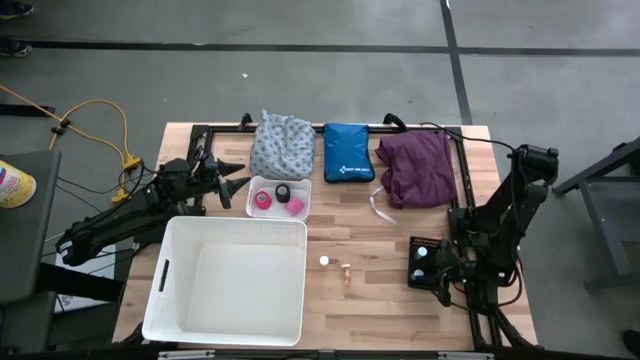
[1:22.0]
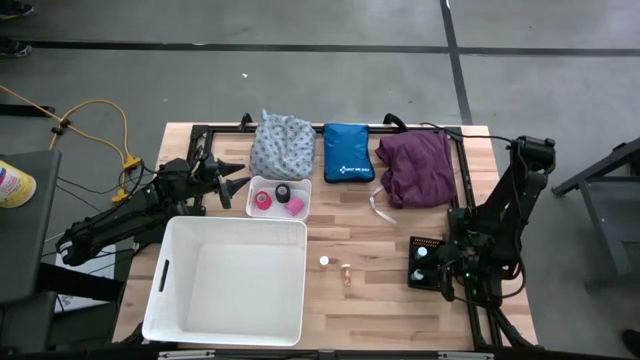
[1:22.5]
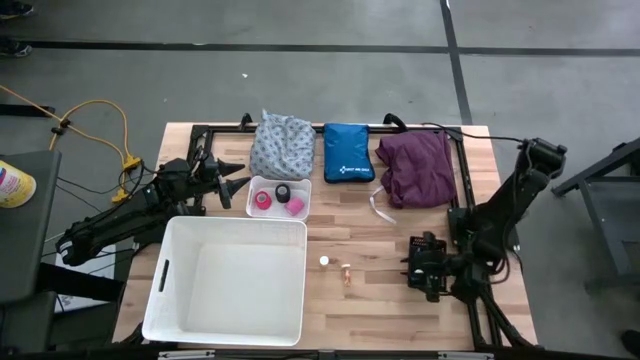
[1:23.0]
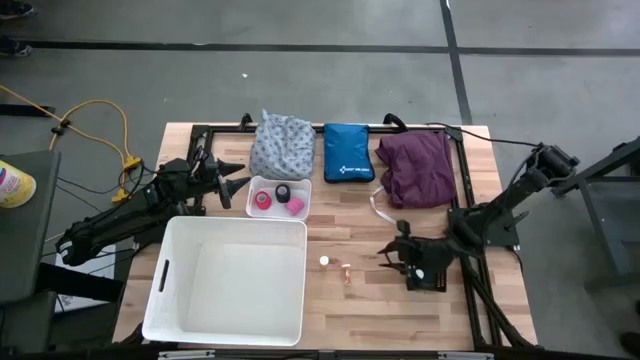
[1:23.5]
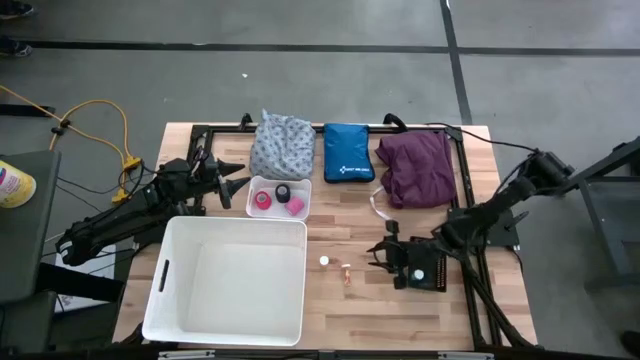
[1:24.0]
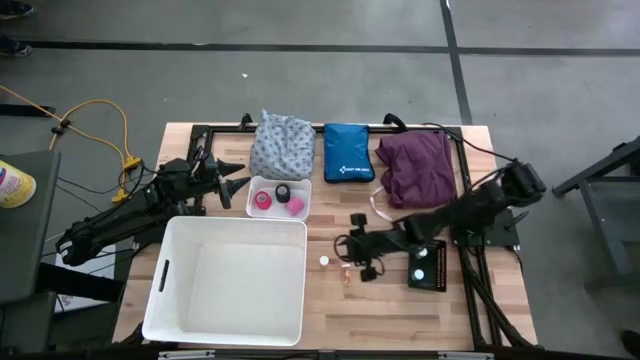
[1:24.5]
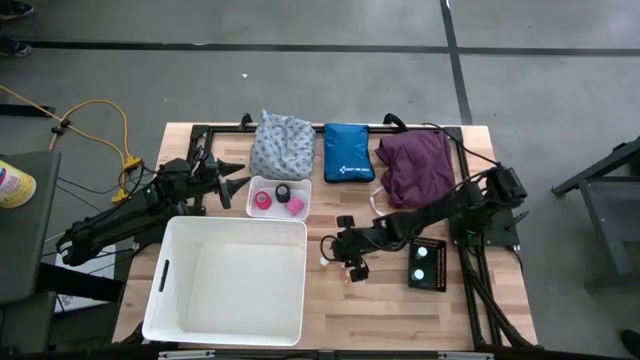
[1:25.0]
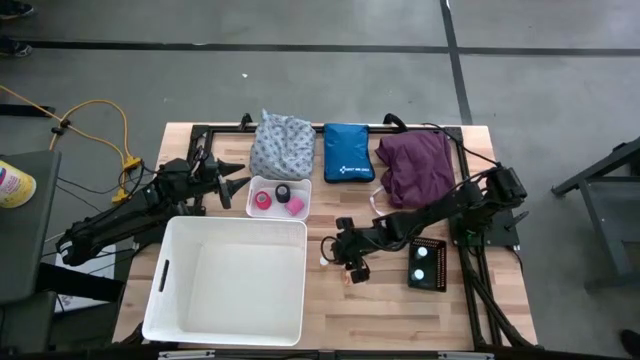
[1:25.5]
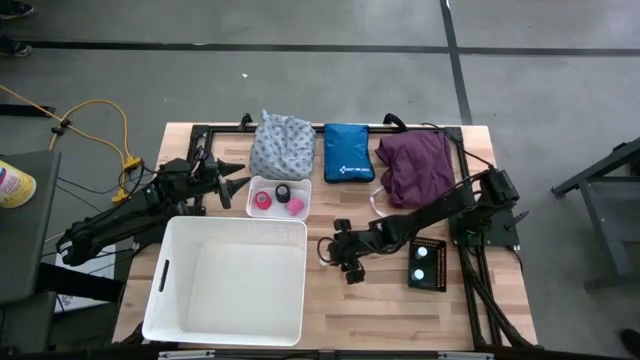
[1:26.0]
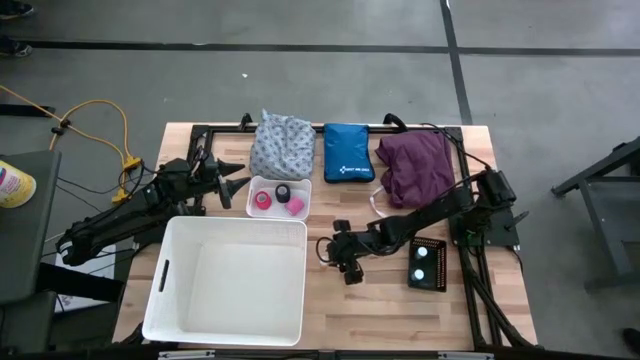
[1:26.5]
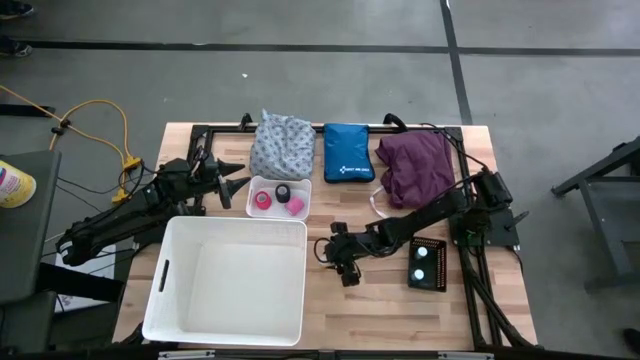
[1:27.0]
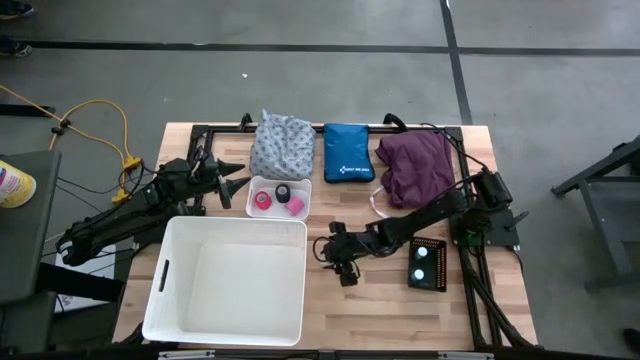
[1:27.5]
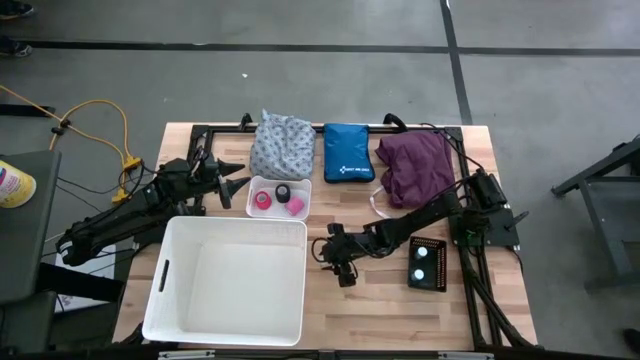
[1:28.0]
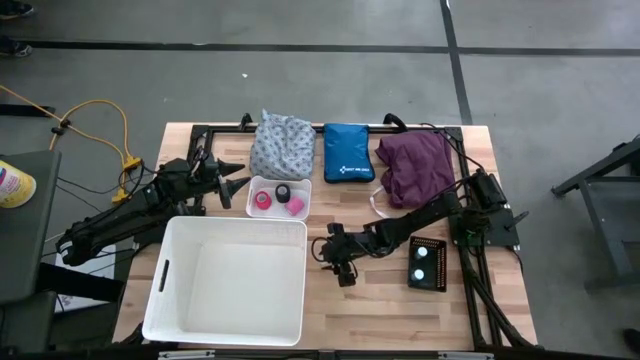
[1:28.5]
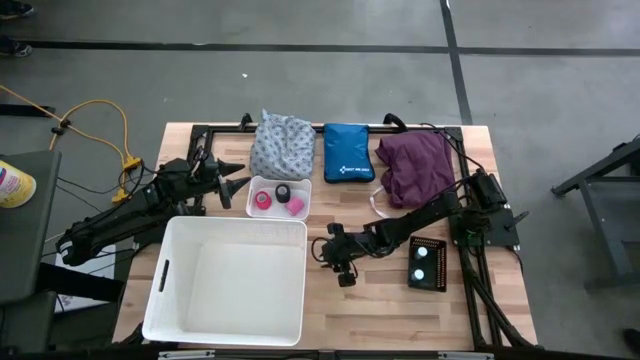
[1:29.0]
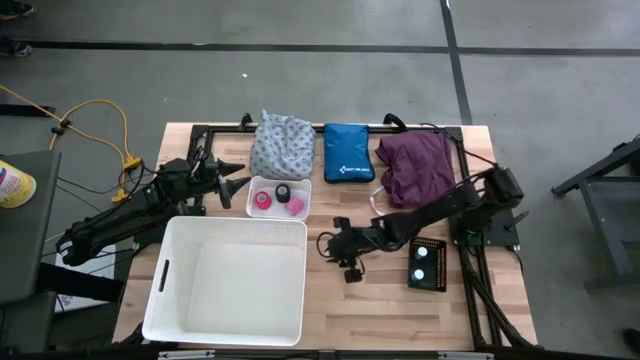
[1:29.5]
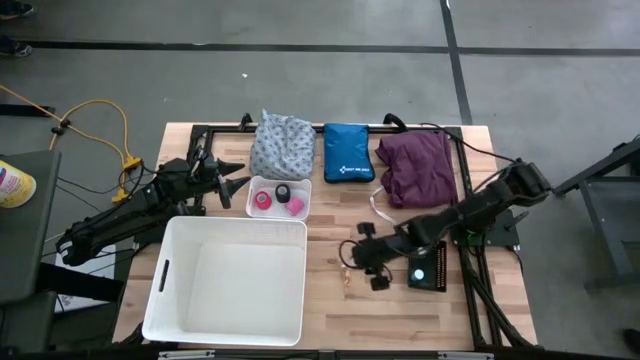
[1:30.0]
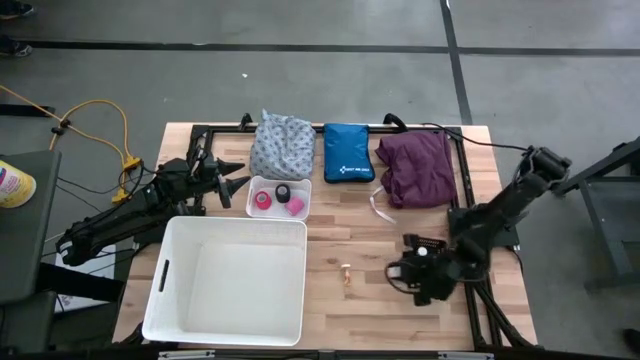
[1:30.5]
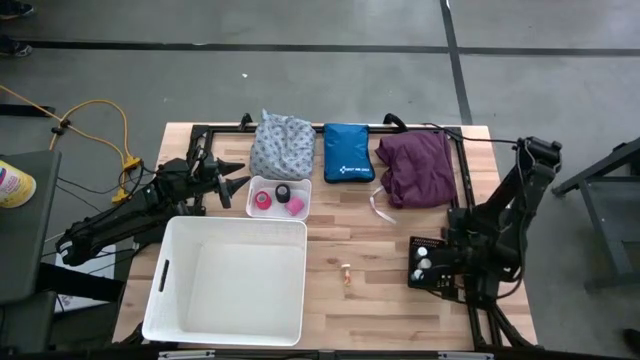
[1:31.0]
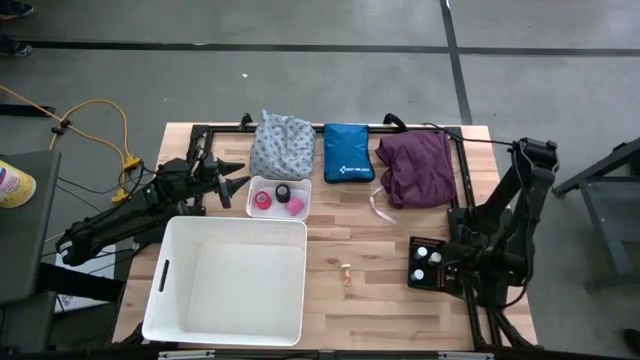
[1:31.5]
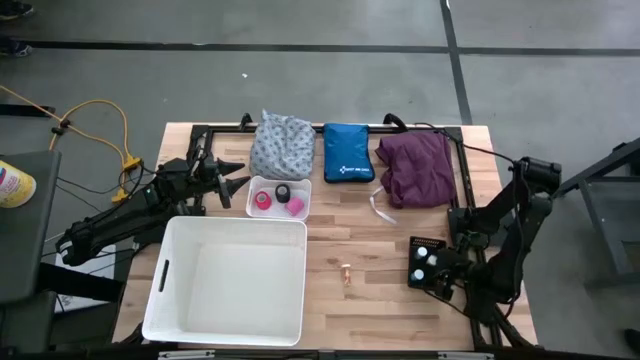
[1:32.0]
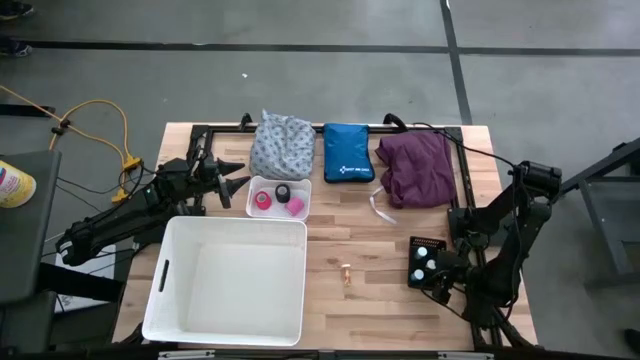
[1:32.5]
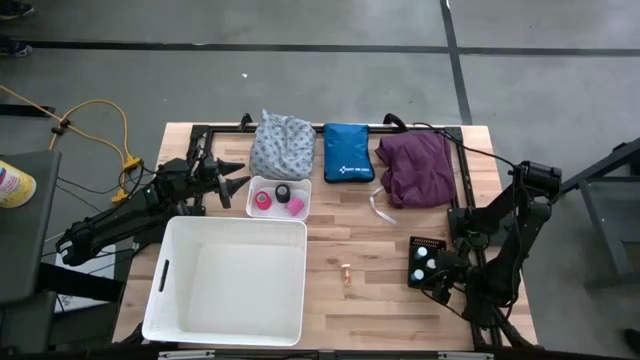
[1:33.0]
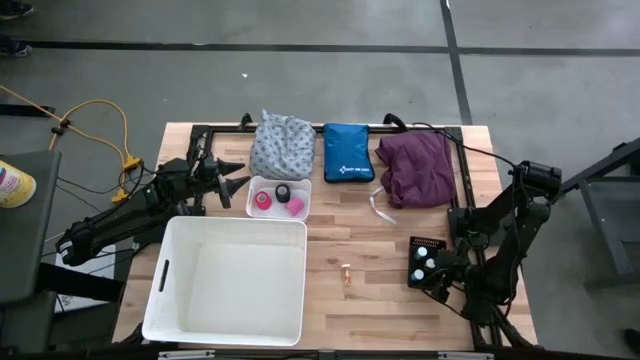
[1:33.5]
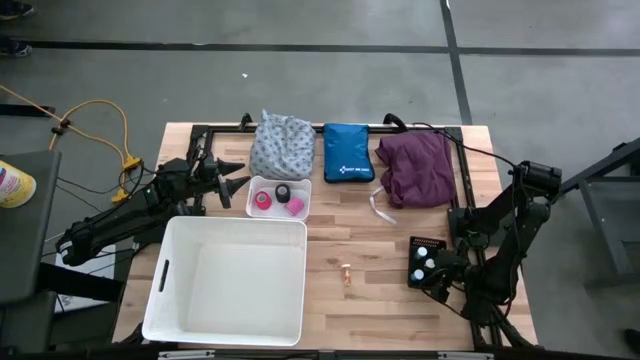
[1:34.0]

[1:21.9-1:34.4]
Task: Pick & place medical supplies in basket/bin
Put the left yellow pill bottle into the black bin

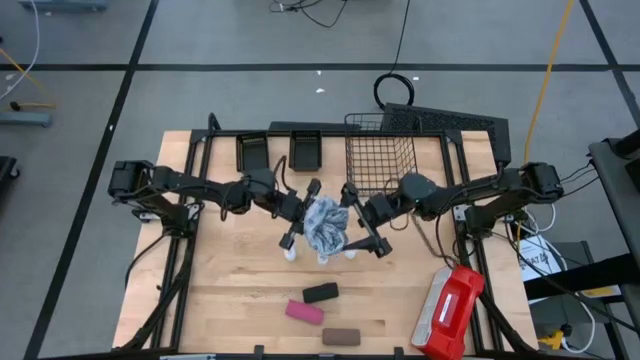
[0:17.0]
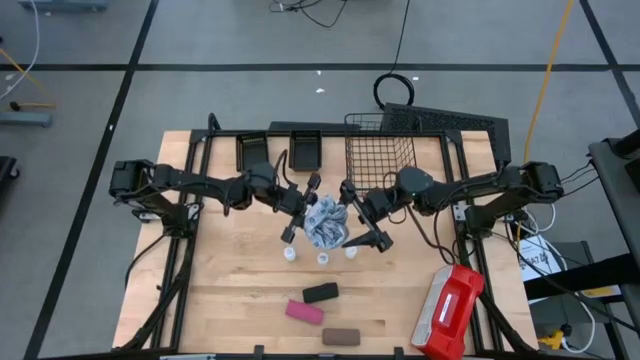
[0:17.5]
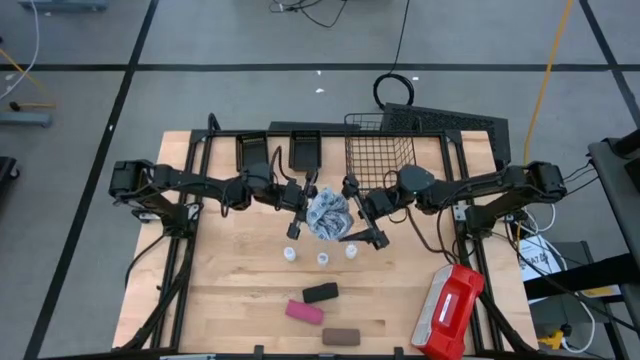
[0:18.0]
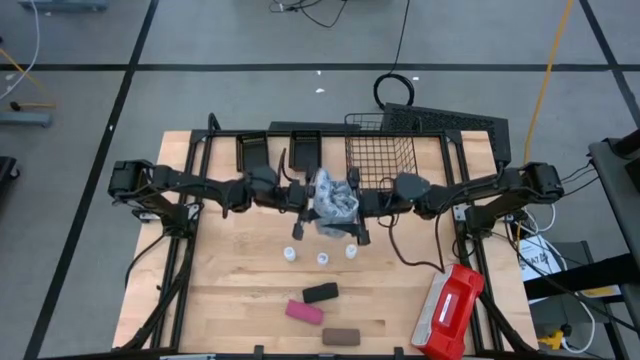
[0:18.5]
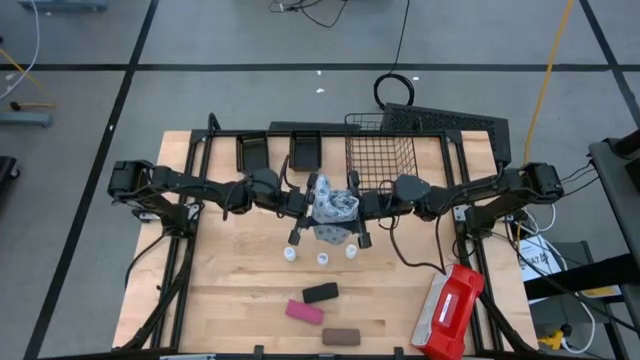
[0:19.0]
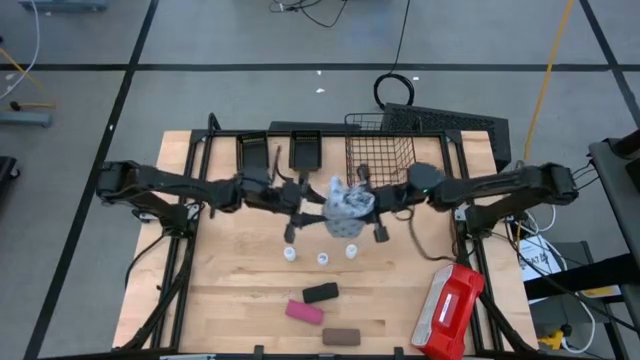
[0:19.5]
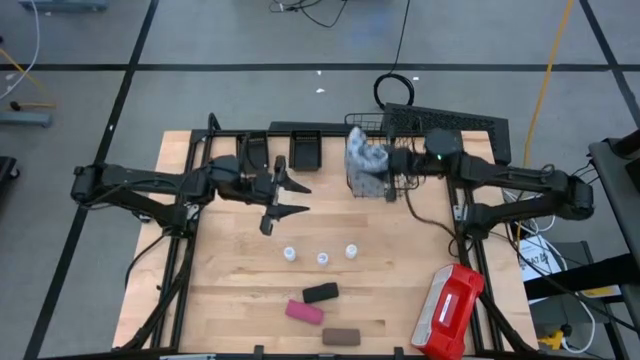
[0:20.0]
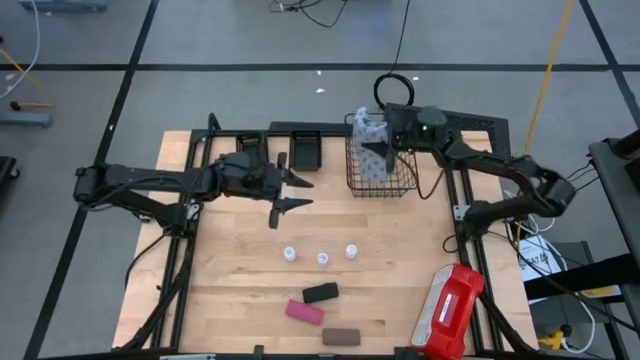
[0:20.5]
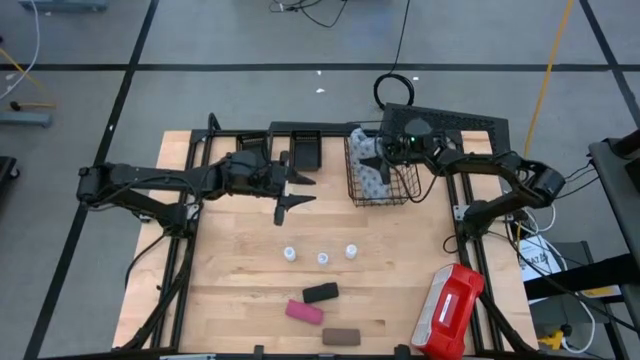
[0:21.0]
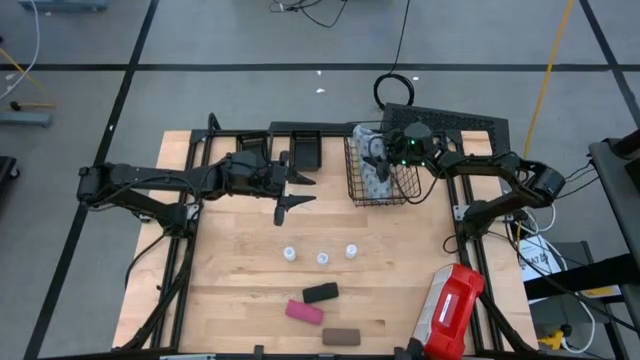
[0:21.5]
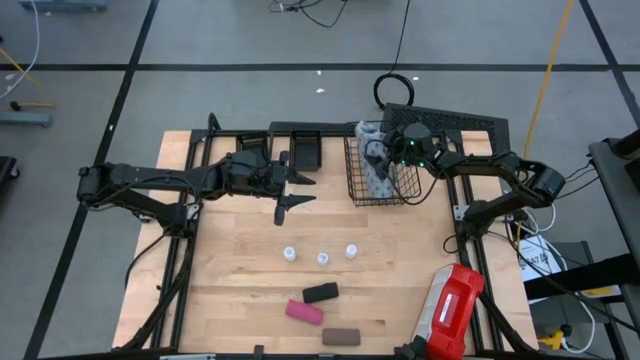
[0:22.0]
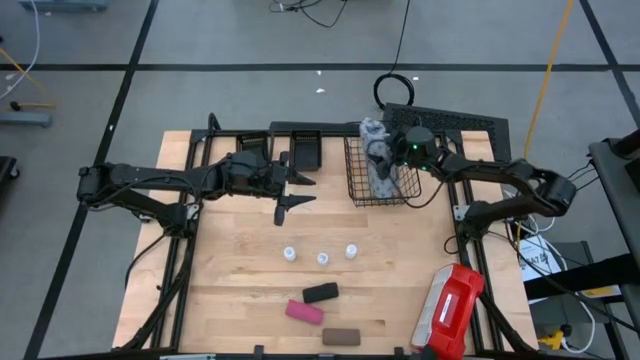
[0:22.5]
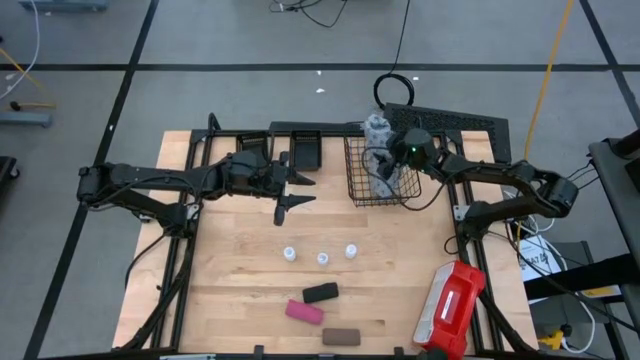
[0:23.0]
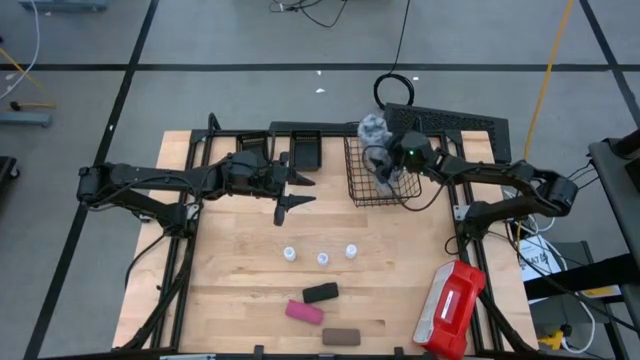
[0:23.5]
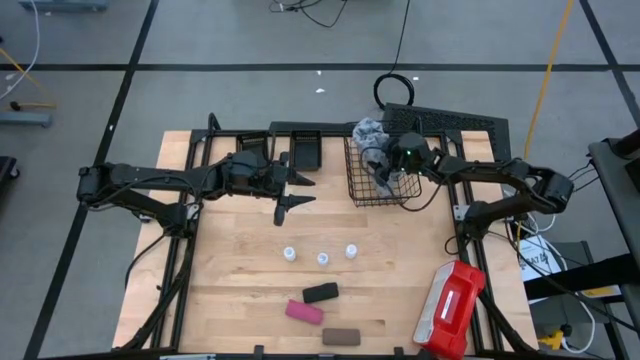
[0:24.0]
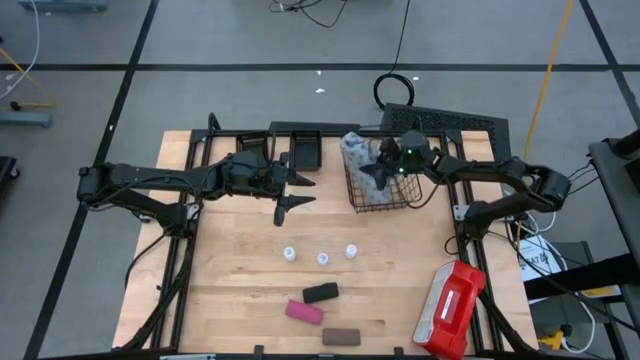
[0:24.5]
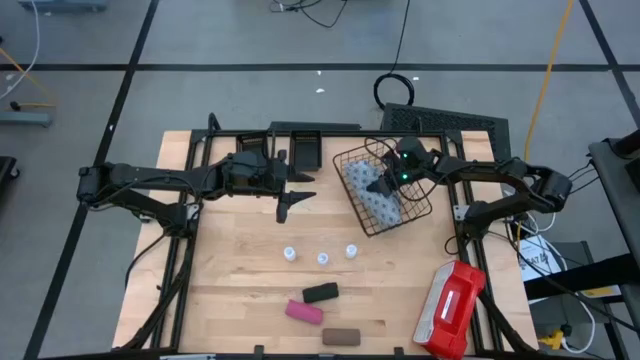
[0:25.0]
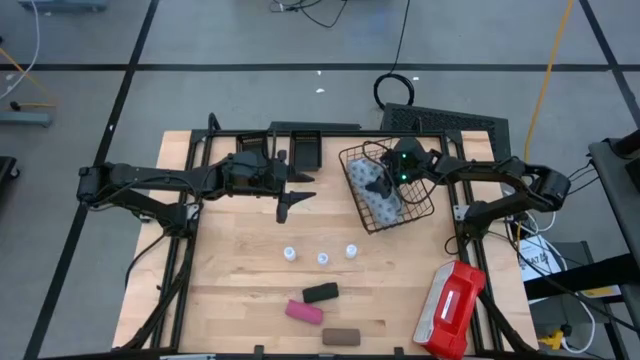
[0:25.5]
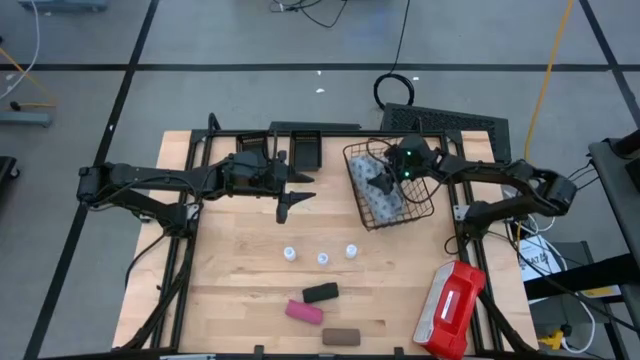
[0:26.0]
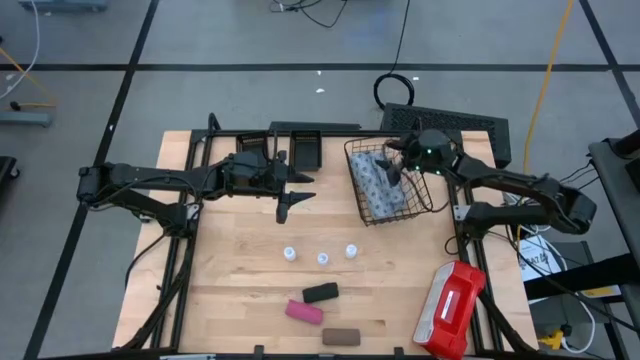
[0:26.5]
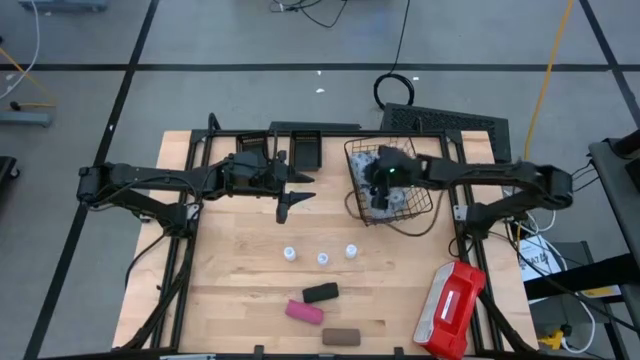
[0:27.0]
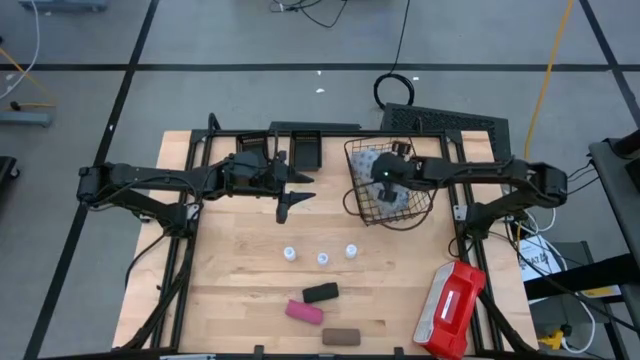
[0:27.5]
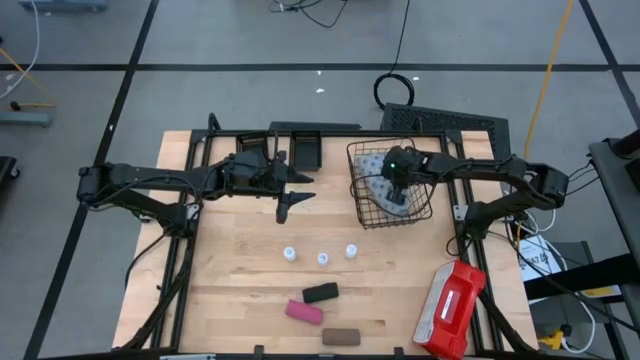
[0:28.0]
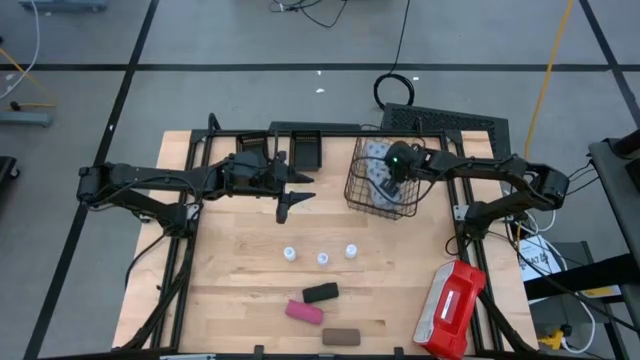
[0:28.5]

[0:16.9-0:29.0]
Task: Pick & place medical supplies in basket/bin
Put the gray patient gown into the black wire basket
